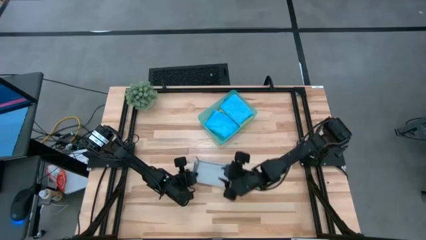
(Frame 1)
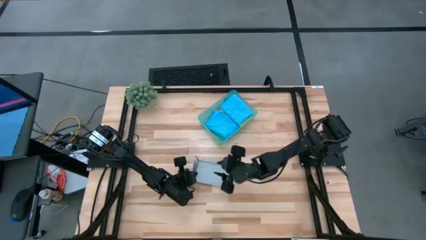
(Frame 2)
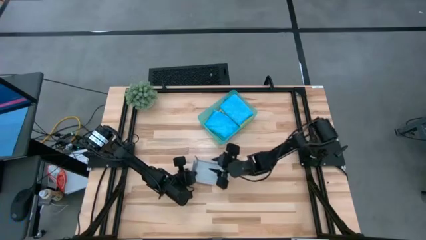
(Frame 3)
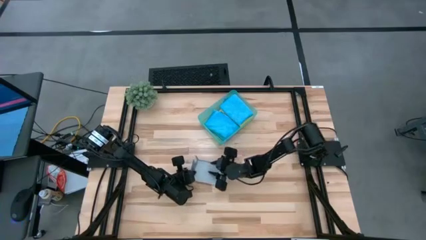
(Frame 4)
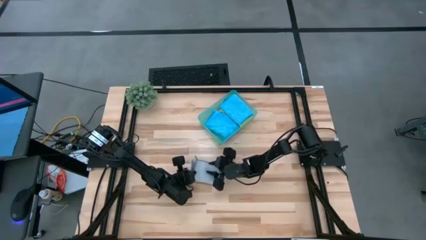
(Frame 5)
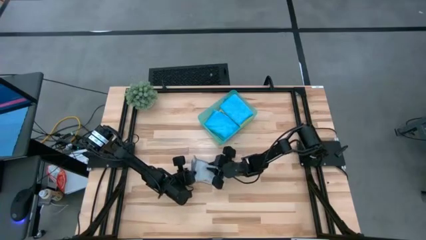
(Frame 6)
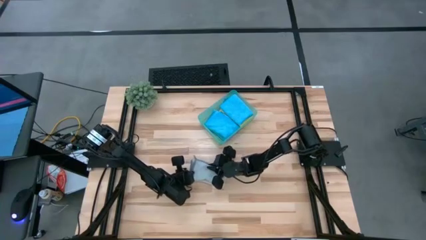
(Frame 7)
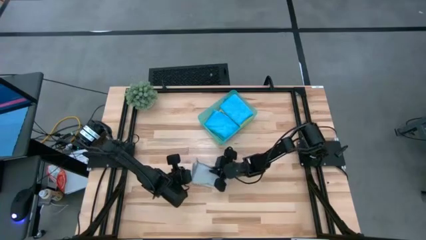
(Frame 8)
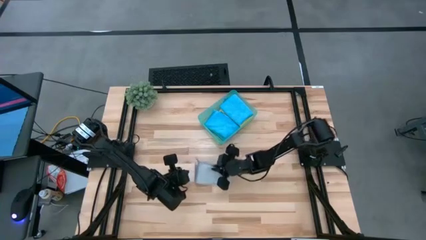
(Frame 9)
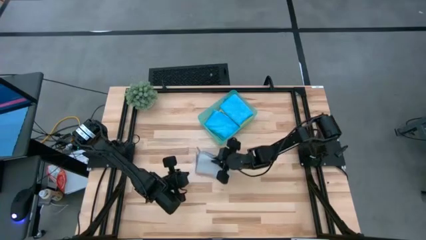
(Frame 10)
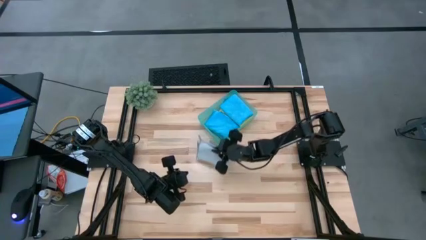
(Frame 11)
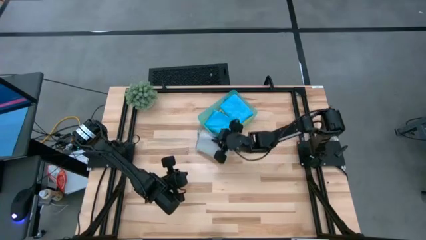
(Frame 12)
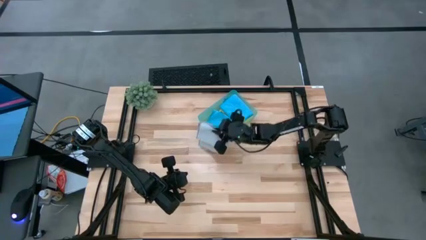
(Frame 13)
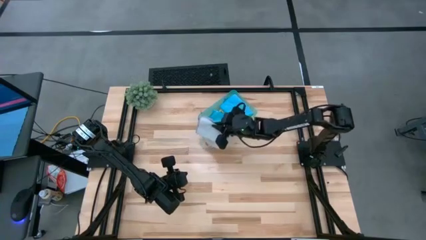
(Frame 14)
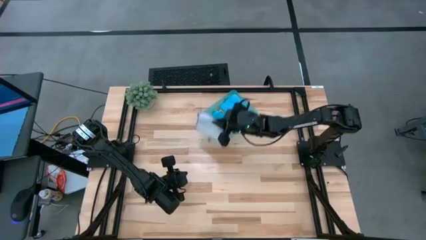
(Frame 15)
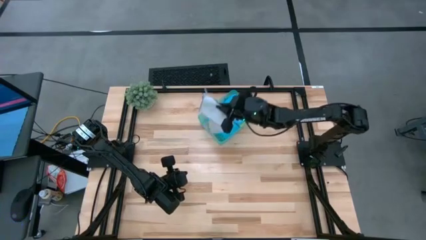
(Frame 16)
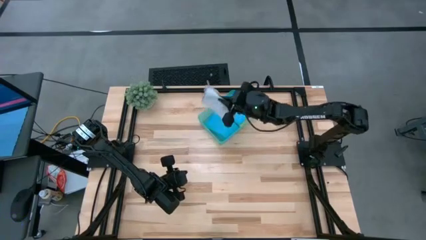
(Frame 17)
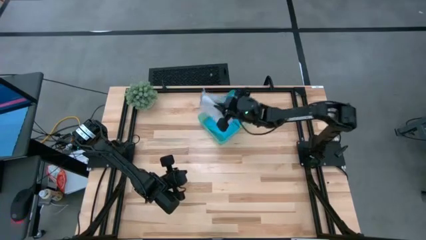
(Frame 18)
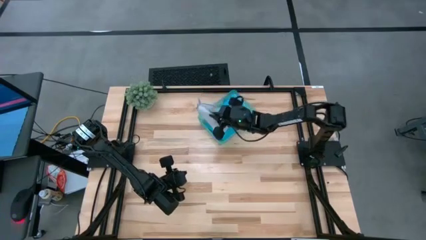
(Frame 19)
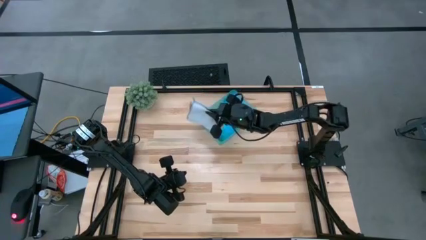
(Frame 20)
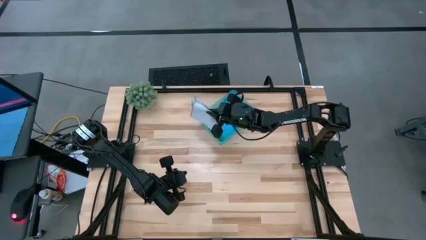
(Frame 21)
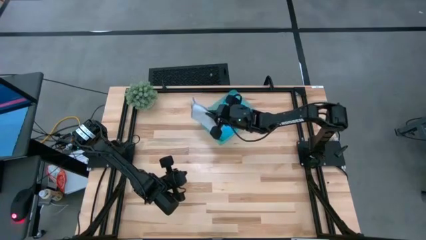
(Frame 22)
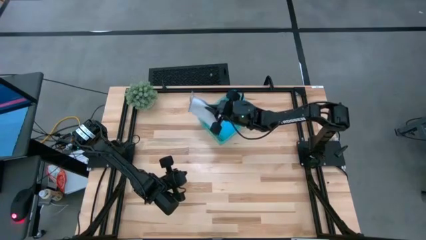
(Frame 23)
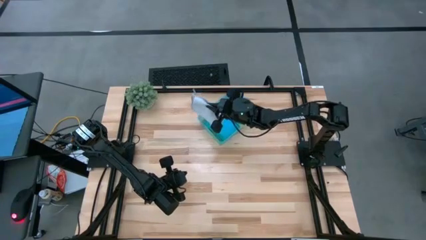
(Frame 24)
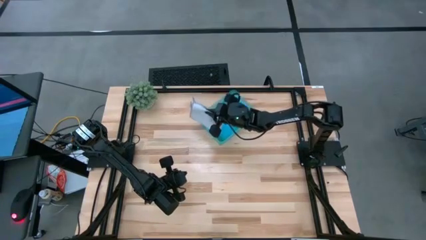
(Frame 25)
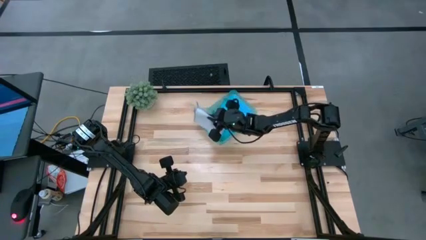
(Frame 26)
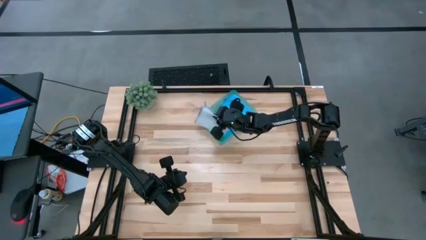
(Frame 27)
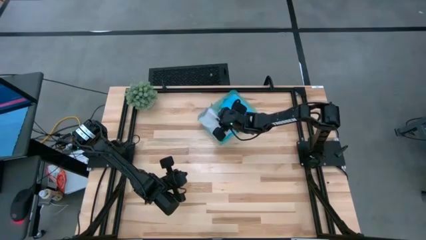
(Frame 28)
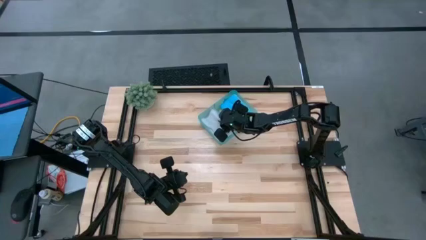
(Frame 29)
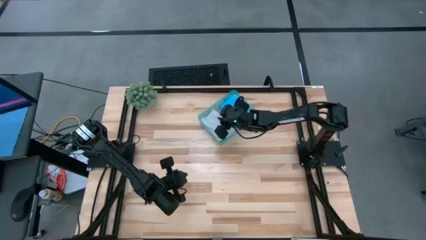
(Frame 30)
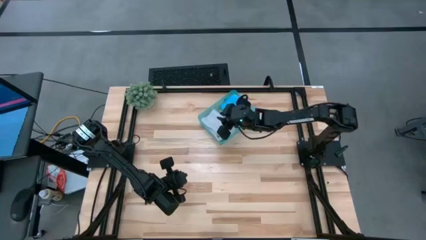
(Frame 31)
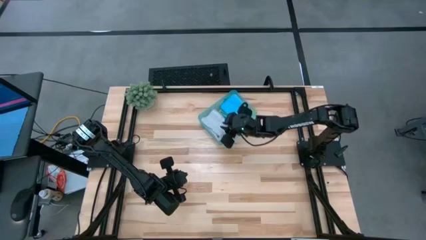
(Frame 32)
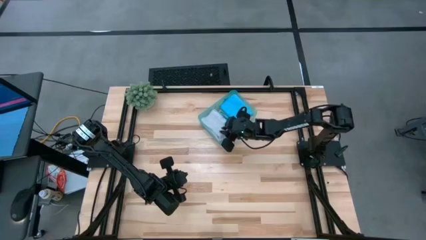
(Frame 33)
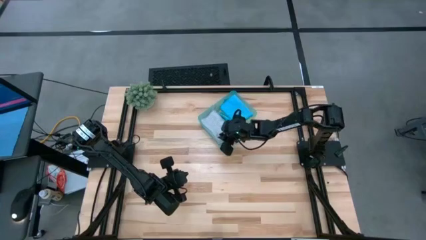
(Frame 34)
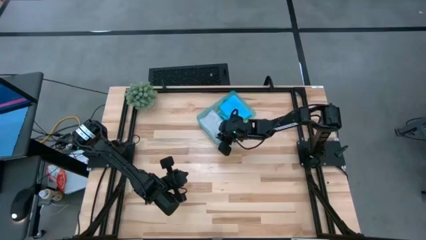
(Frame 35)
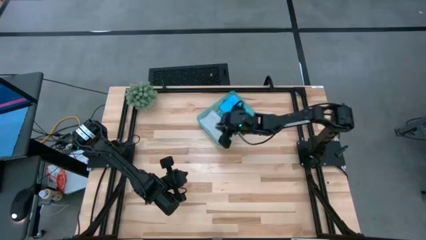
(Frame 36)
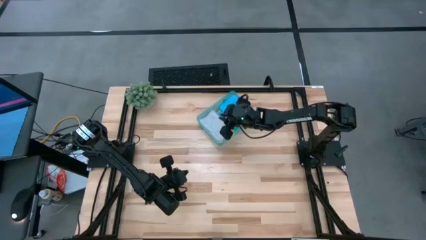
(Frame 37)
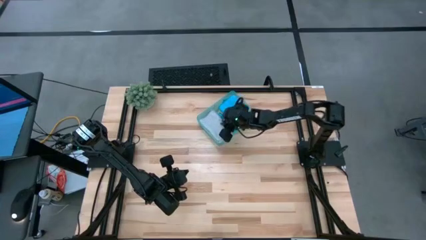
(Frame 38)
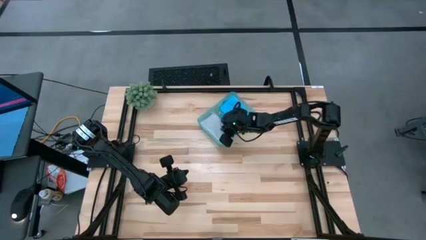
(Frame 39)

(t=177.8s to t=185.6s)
Task: Fold microfiber towels
Put the folded gray microfiber towel into the green bin

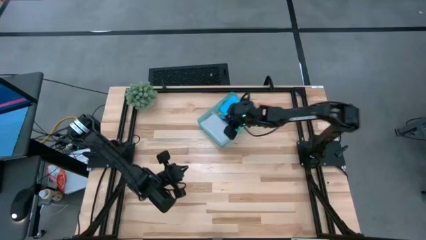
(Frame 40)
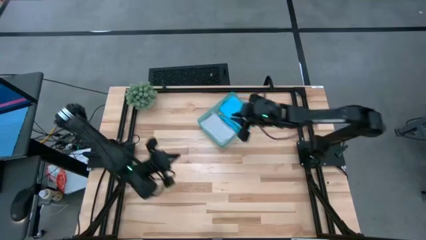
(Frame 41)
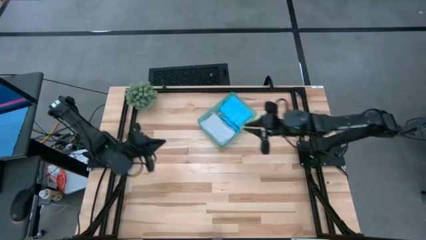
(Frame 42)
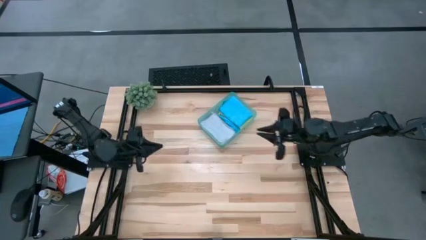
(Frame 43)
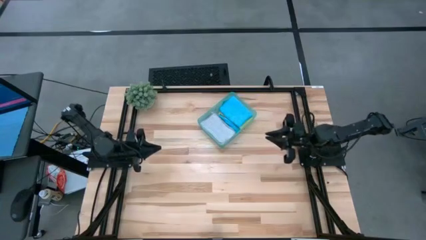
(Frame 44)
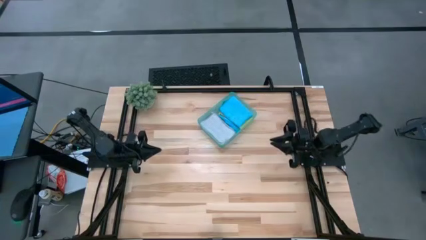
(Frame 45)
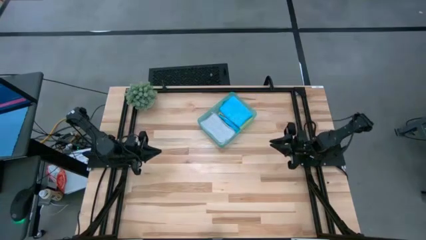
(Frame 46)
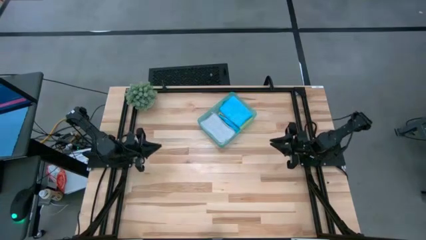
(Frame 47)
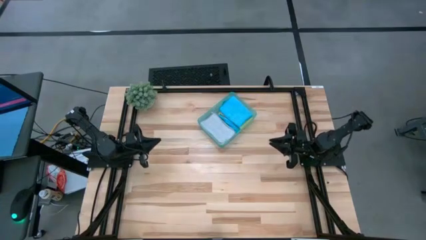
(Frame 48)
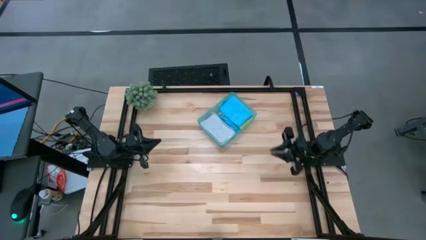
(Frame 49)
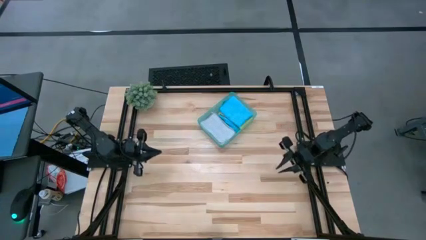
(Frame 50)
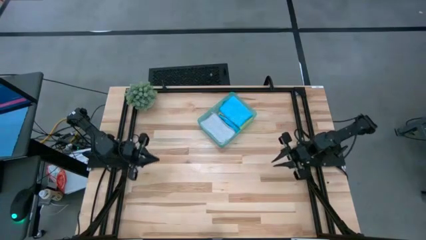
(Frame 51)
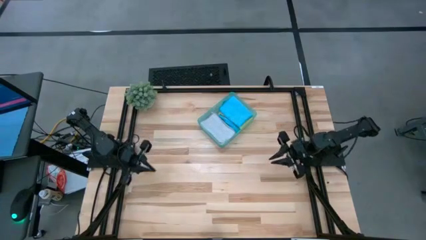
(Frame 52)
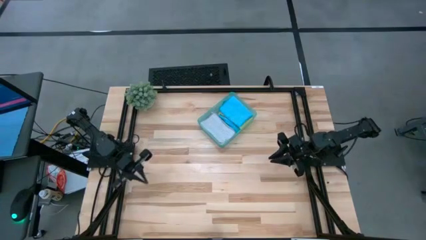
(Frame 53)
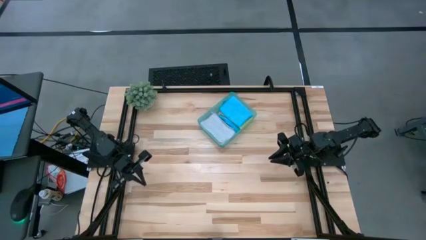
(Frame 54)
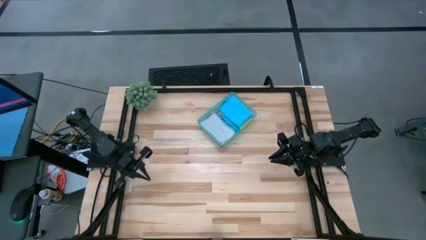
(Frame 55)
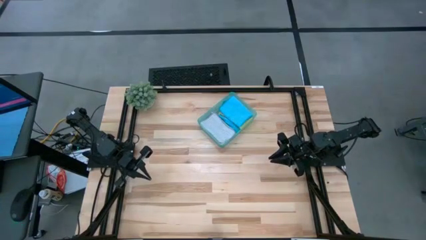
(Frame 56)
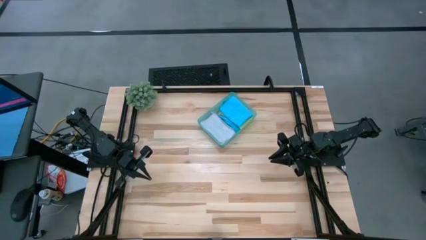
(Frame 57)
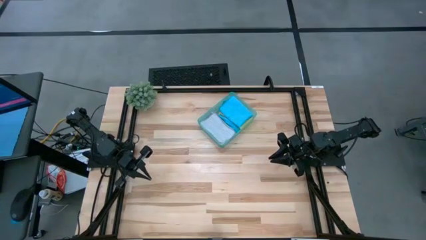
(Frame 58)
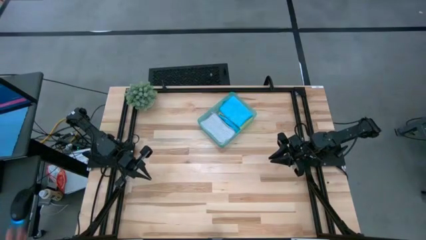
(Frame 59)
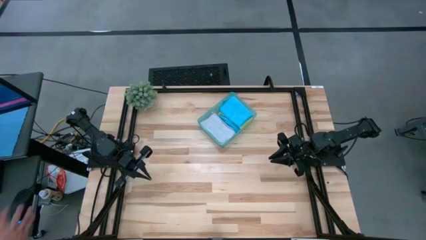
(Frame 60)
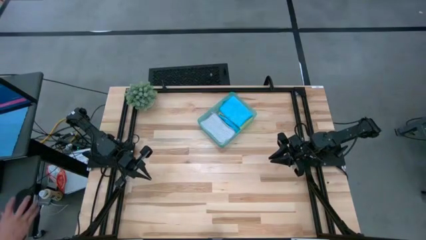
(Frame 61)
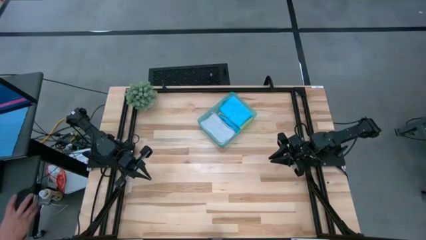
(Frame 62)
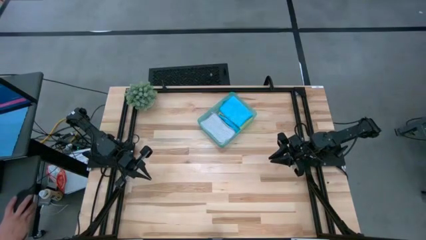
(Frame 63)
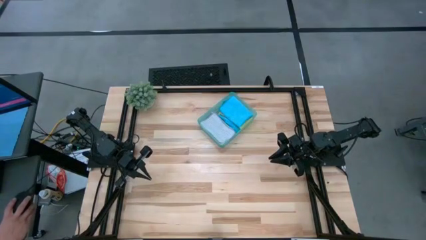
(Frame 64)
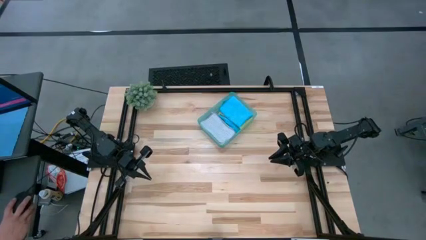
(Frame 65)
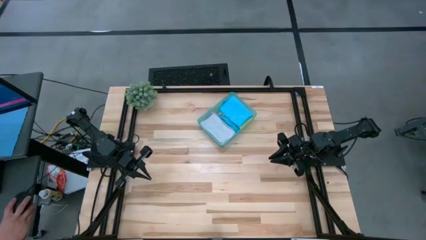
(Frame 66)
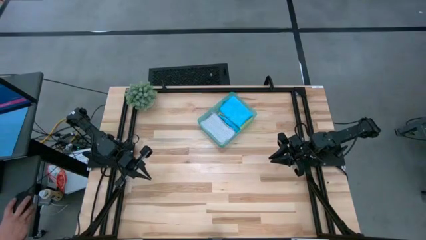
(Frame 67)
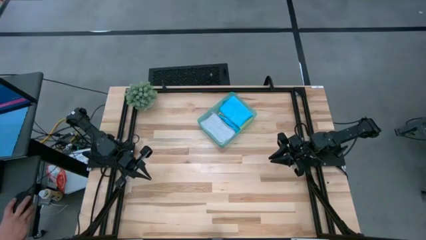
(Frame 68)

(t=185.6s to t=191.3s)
Return to Home Position

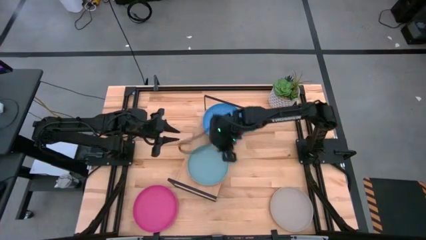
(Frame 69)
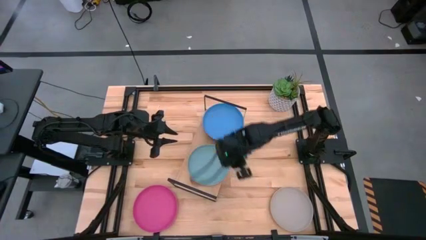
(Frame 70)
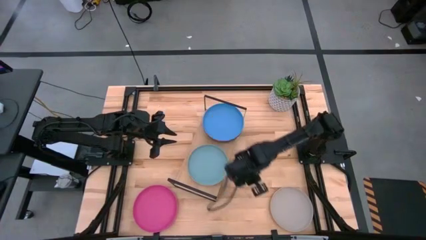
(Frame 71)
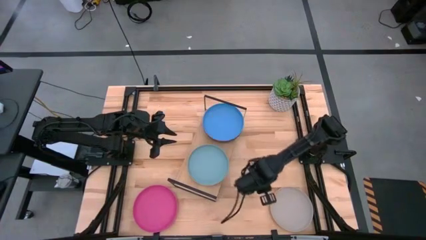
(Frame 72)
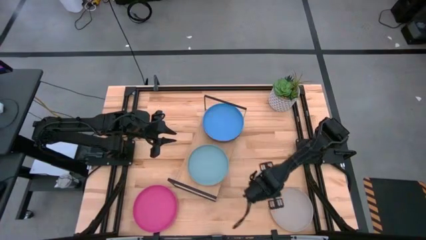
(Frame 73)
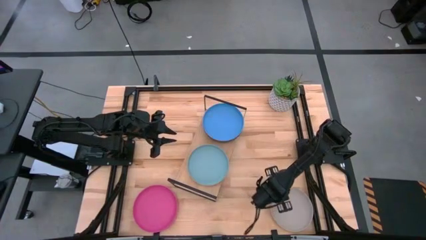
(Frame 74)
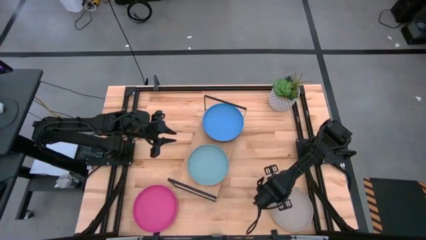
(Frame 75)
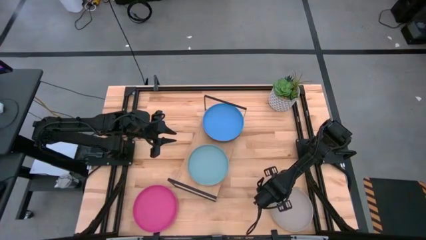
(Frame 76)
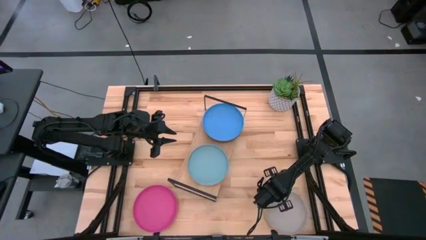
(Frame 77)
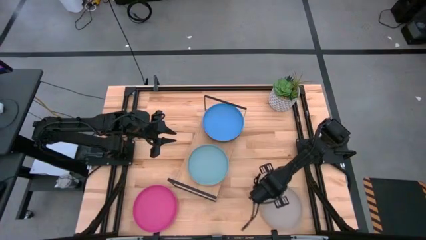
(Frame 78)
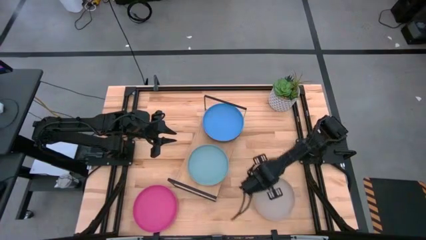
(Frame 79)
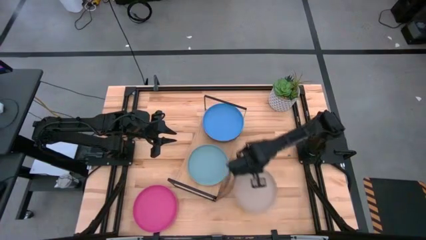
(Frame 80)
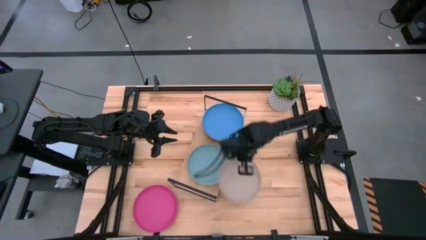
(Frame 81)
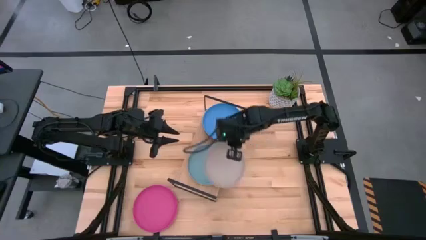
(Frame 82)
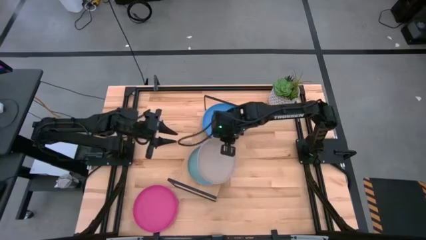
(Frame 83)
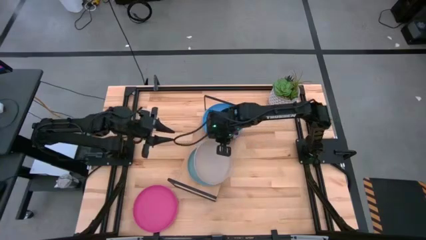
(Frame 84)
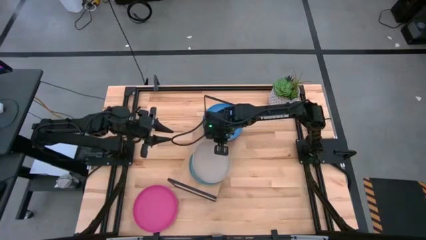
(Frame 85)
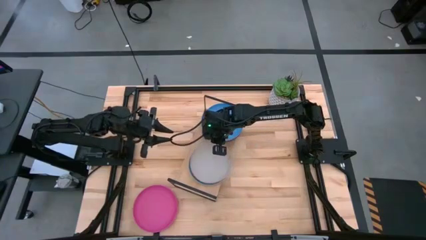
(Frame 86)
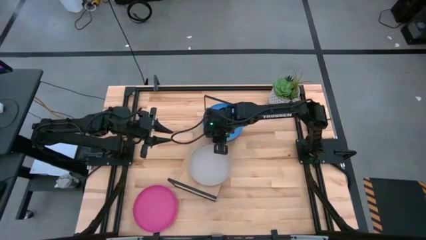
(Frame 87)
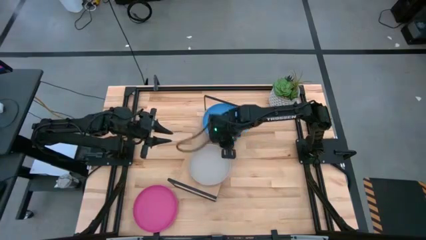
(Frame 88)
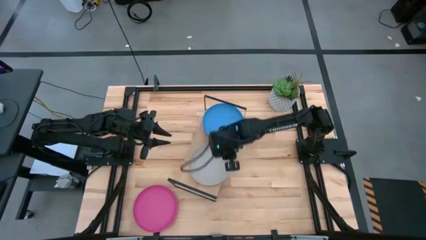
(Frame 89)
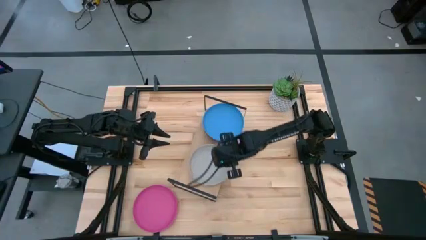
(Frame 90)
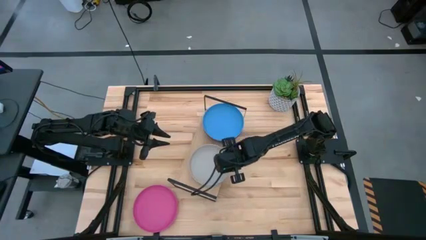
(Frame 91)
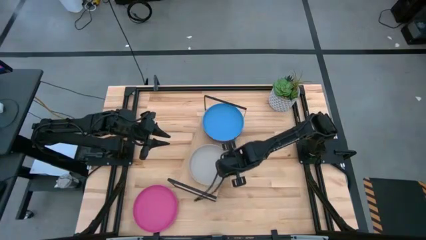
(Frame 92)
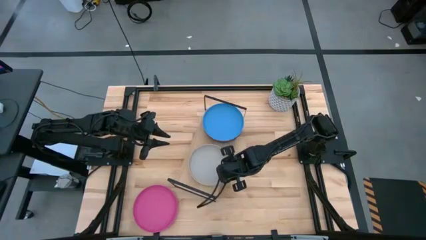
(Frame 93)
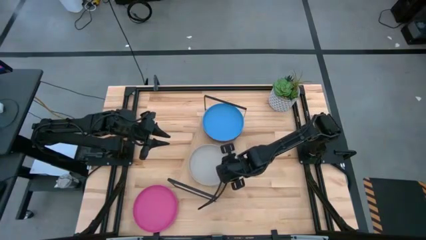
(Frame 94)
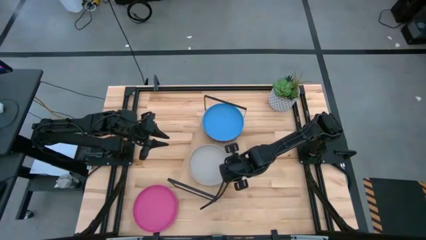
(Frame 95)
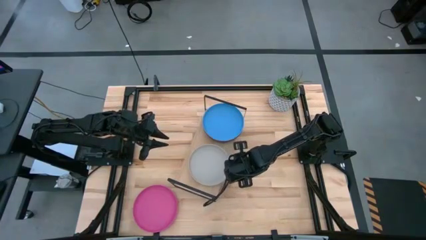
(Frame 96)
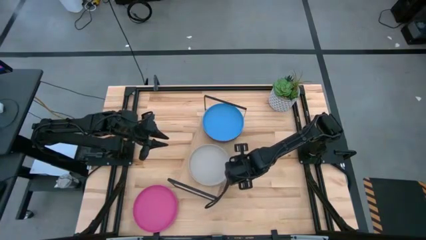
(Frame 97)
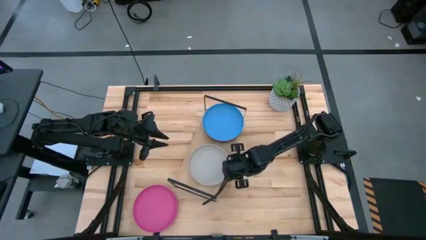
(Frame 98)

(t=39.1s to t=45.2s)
Task: Place and stack plates onto a shelf
Stack the gray plate on top of the light blue plate on the shelf
